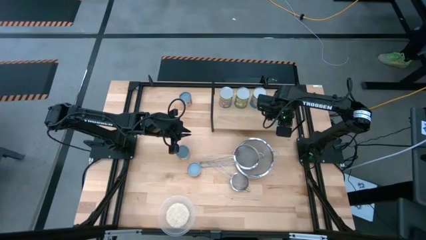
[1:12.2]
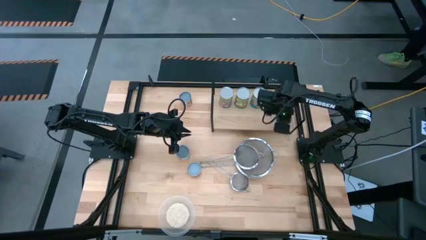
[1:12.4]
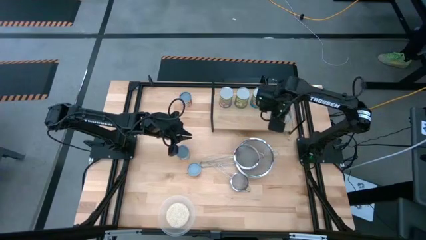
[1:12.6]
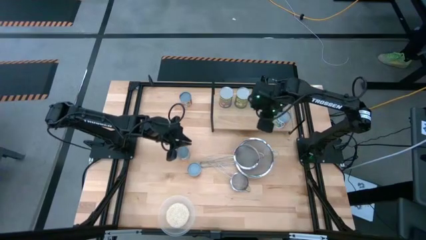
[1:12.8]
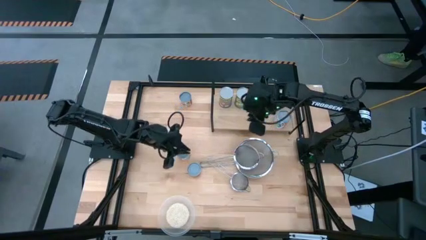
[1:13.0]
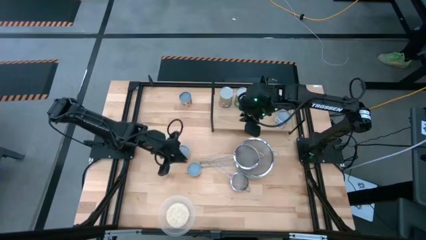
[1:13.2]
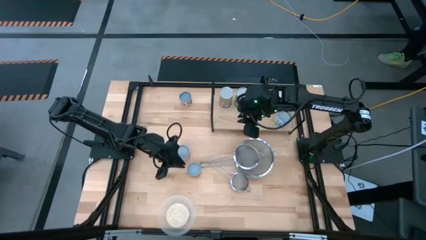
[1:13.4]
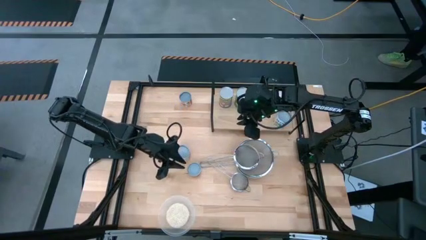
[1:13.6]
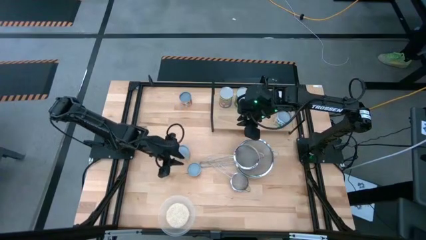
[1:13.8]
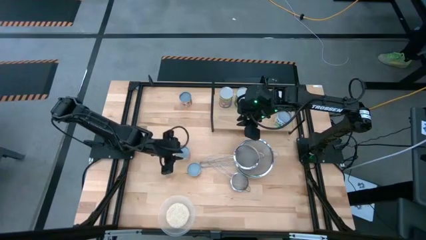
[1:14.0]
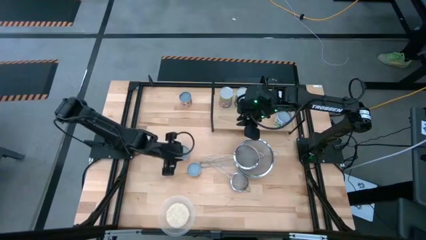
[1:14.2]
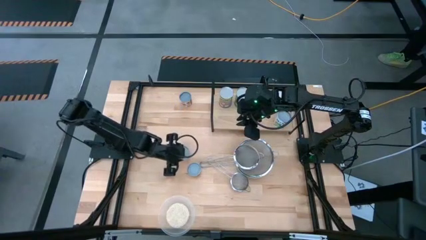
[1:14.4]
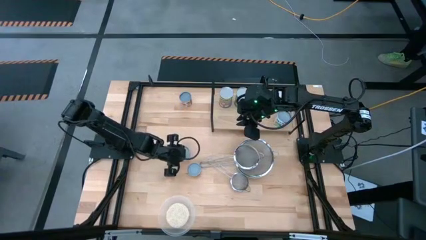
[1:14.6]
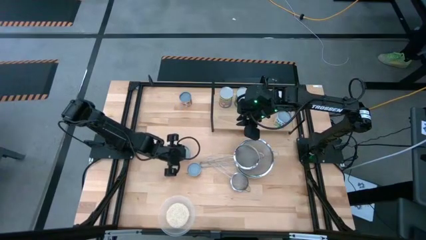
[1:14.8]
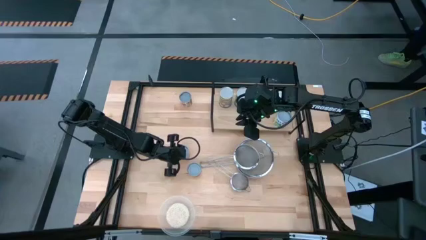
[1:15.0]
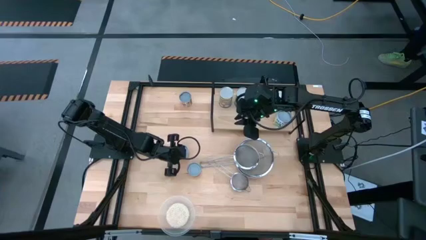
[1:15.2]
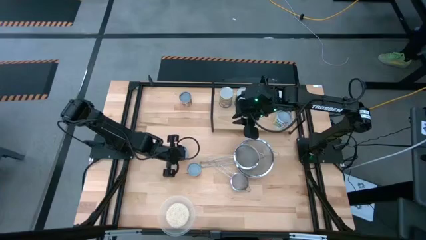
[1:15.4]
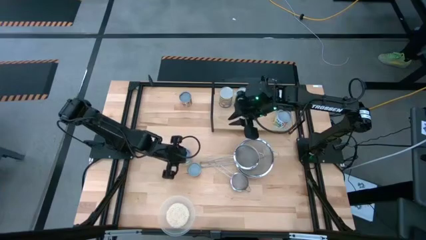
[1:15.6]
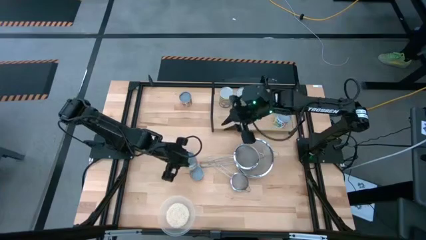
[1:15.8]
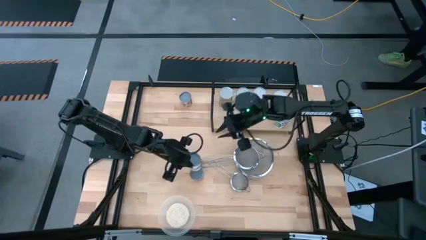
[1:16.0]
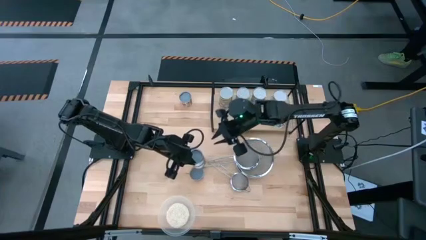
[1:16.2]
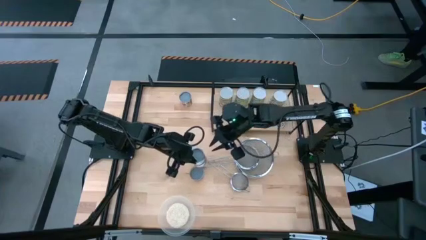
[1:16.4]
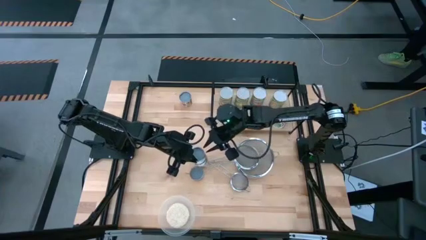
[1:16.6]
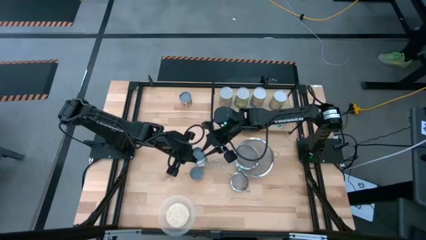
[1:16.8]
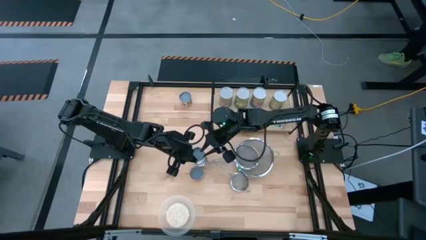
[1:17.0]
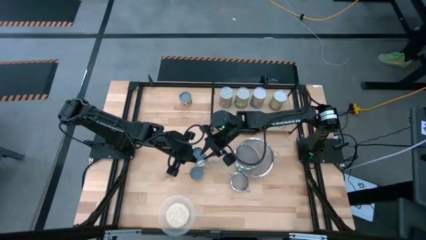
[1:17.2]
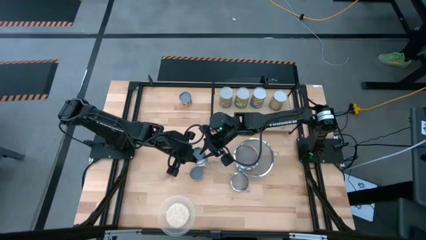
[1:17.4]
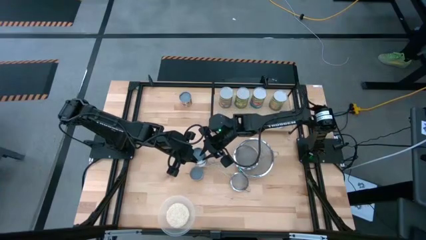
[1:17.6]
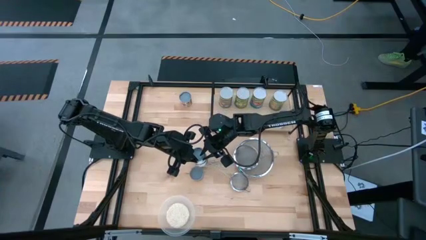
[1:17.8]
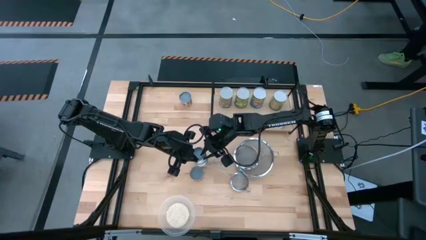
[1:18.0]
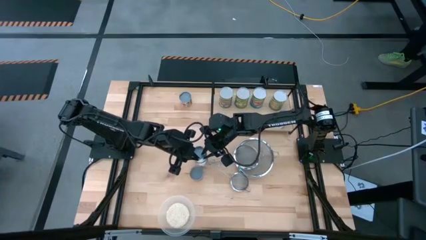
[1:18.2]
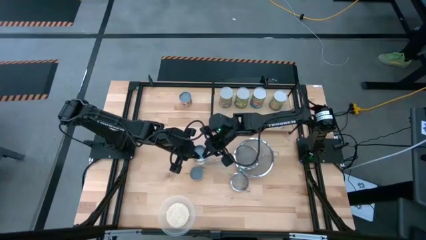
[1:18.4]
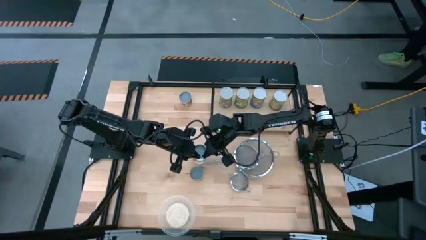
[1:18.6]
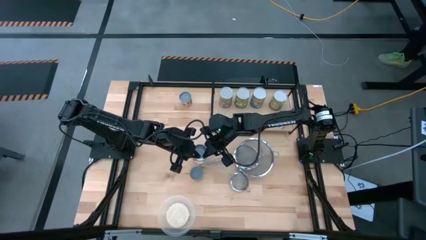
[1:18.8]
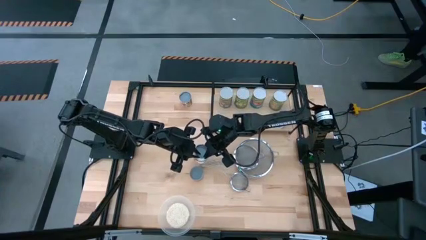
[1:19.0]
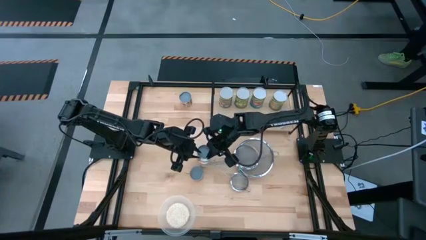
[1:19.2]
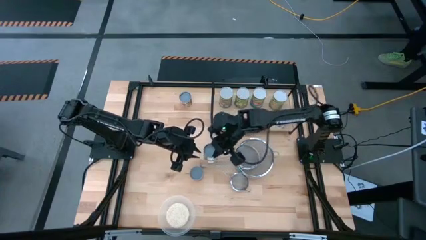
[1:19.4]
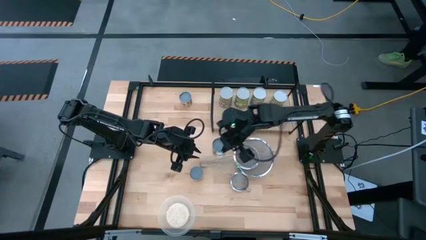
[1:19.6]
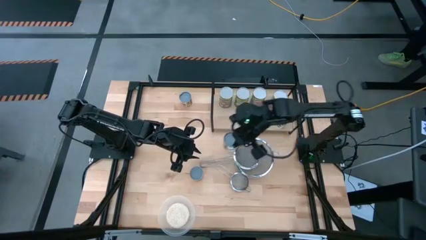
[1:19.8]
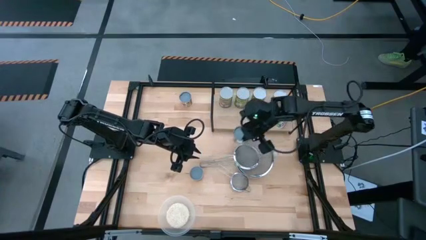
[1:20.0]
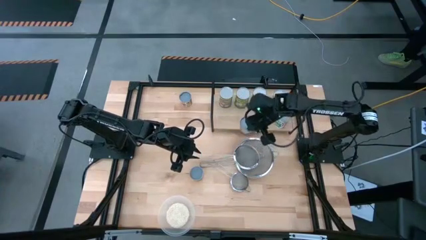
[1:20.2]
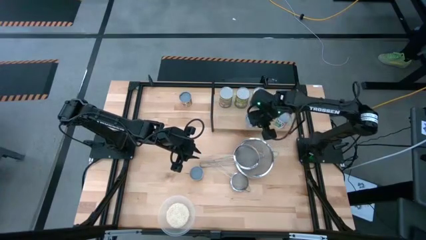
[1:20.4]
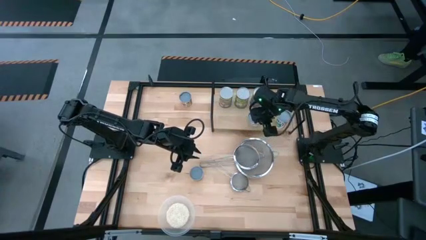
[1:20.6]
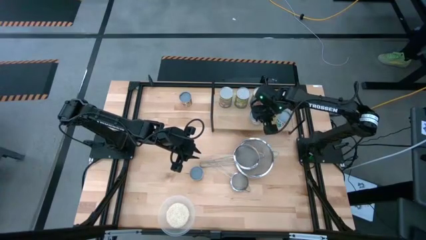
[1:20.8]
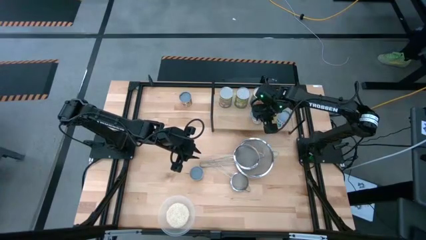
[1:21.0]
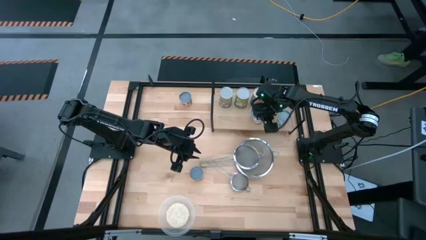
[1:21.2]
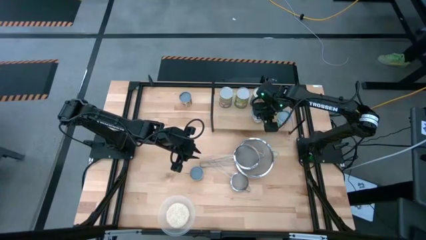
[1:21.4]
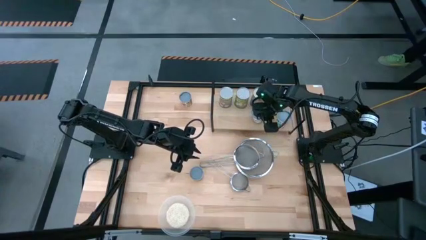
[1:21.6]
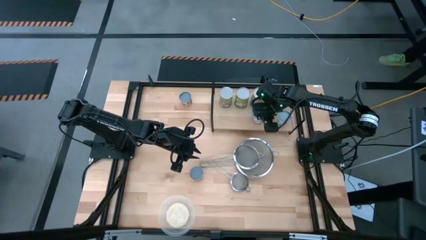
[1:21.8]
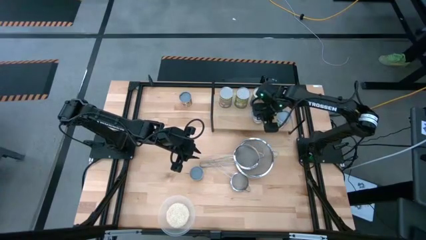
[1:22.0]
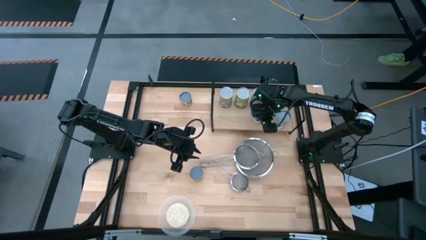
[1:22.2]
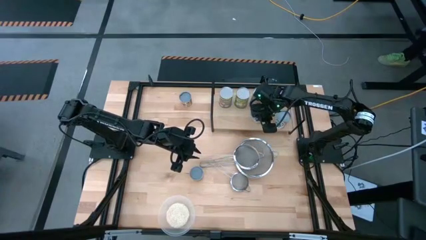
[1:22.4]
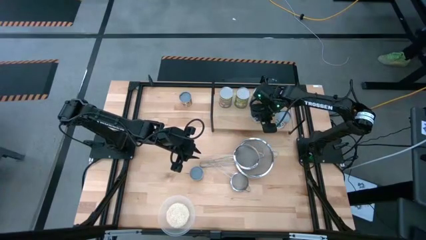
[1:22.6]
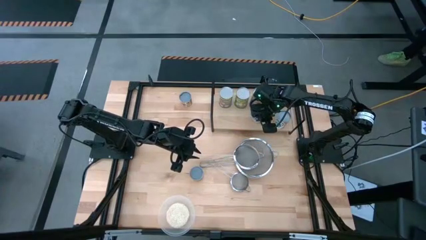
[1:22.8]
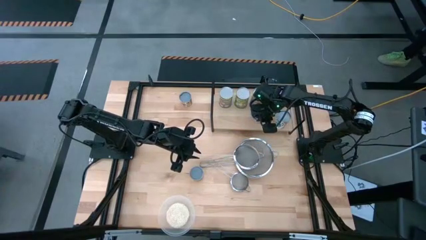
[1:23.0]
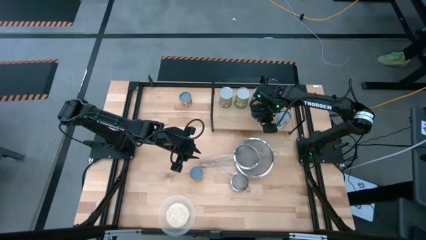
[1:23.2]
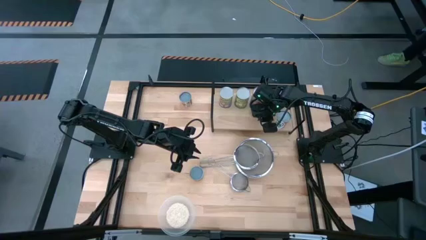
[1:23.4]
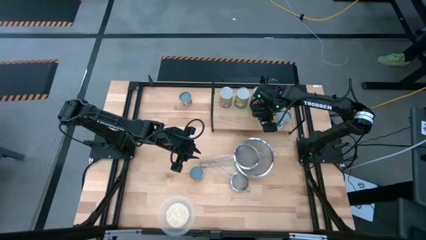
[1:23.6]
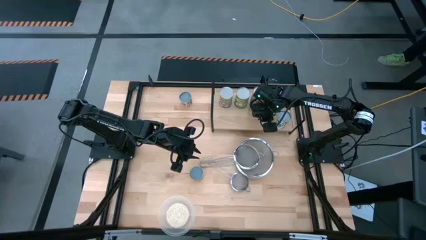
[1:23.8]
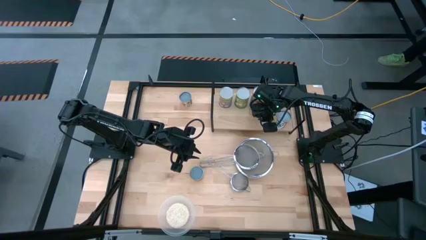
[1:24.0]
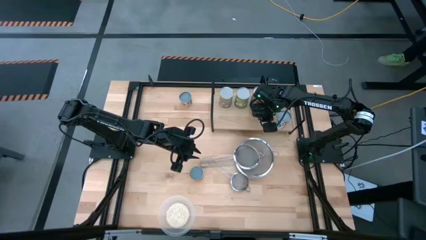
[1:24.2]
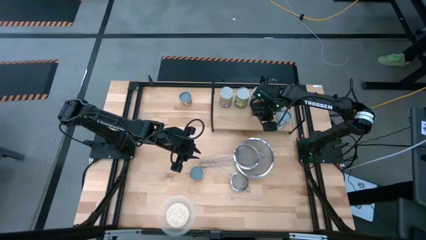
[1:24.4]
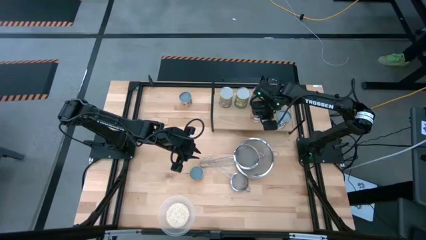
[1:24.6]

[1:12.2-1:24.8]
Task: Pick and place cans onto a shelf
Put the canned orange on the shelf
